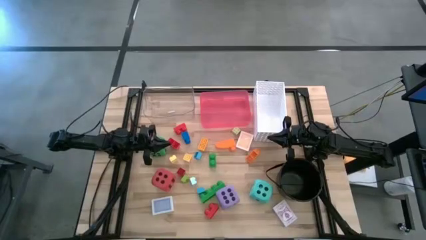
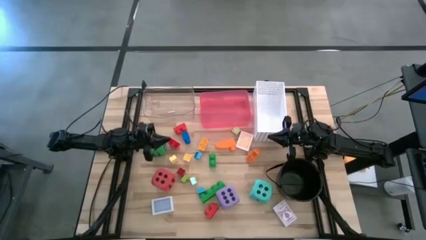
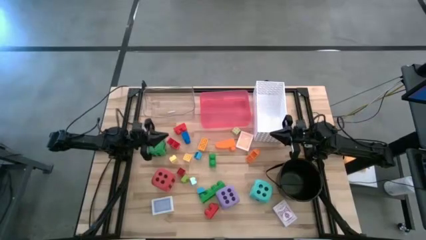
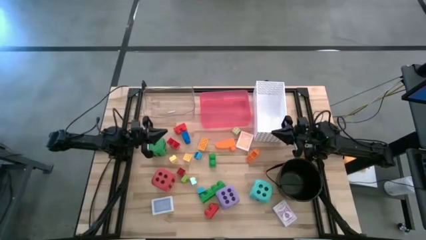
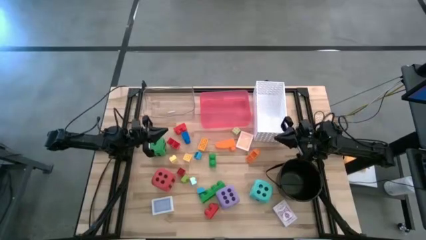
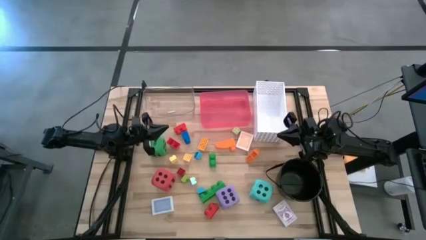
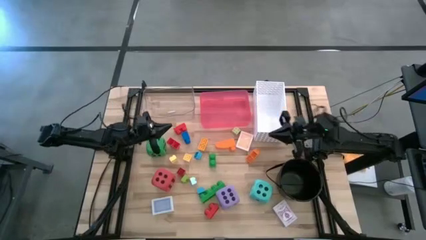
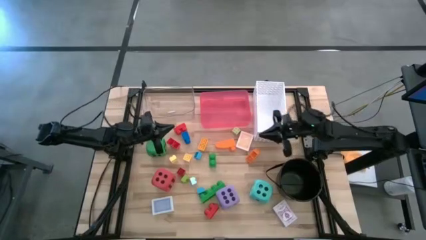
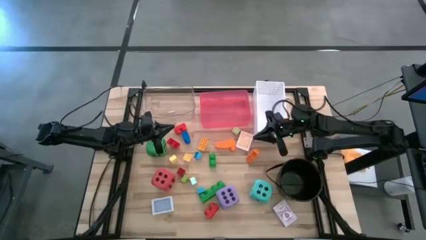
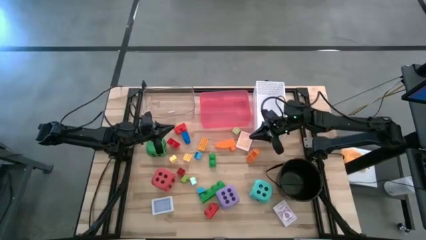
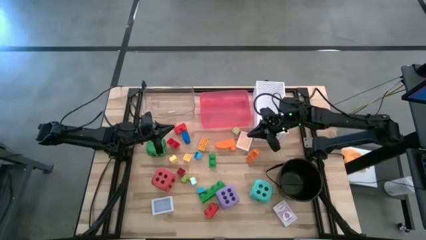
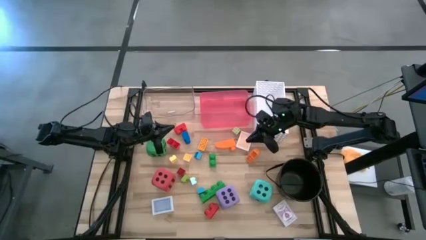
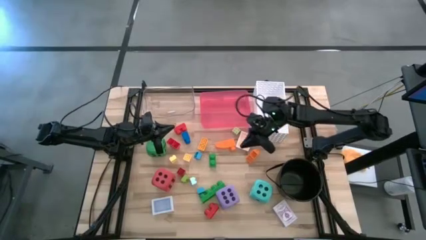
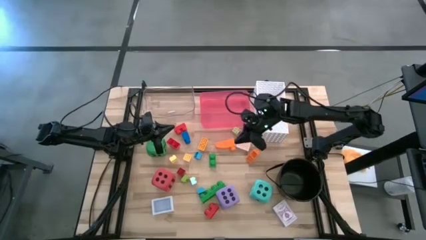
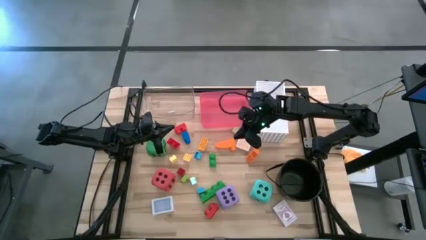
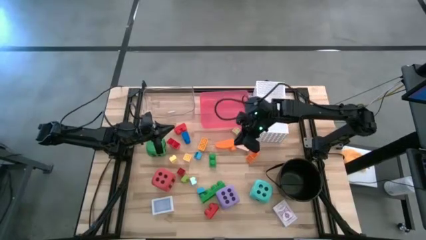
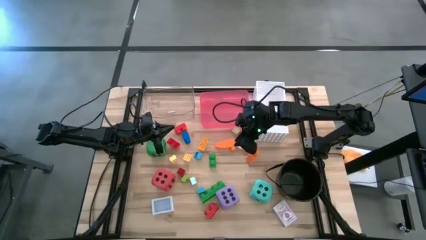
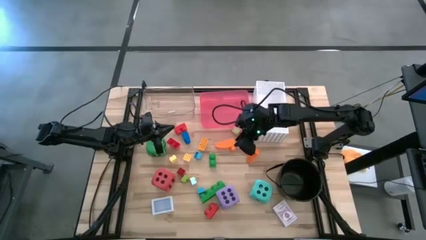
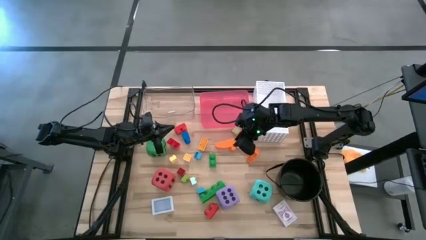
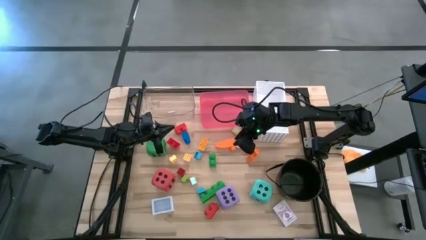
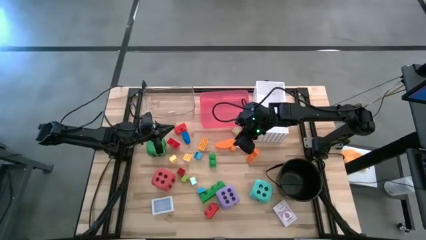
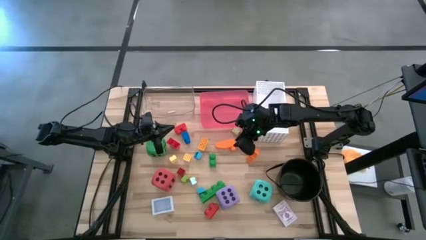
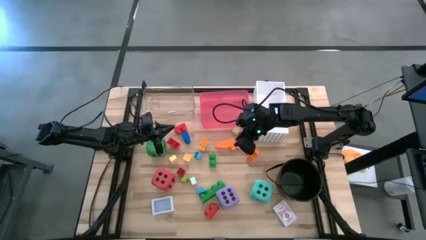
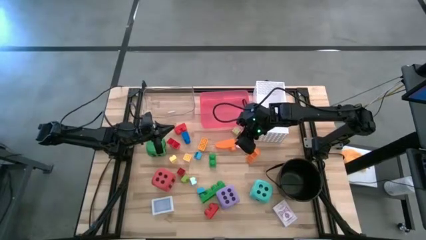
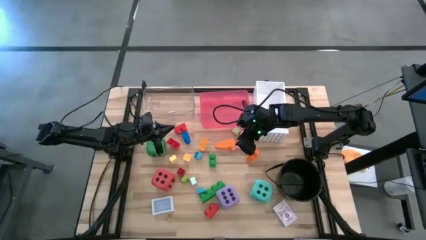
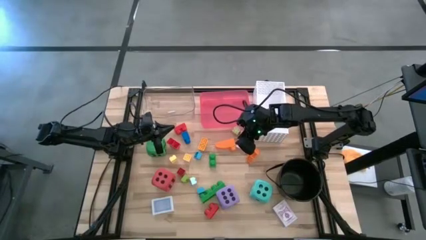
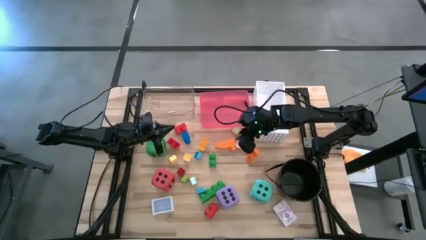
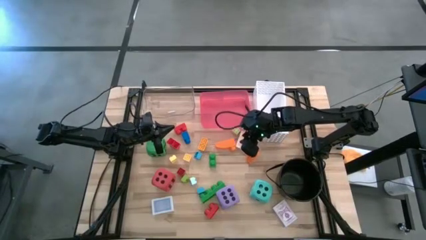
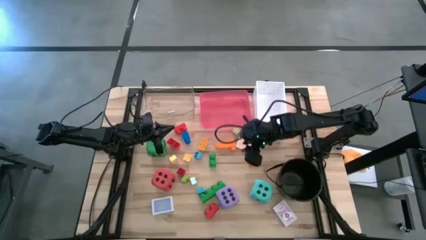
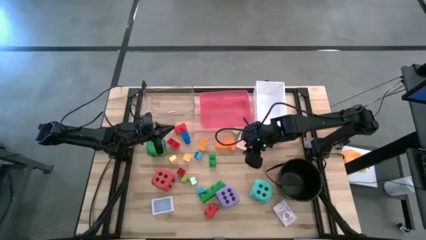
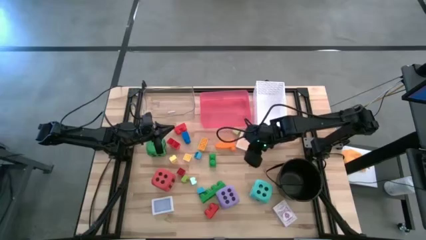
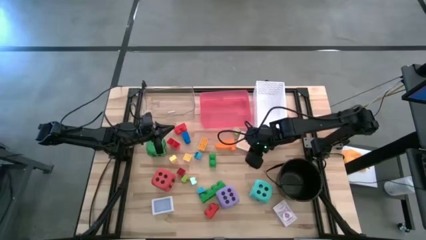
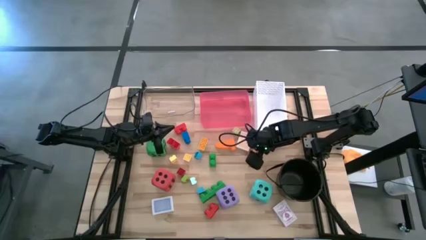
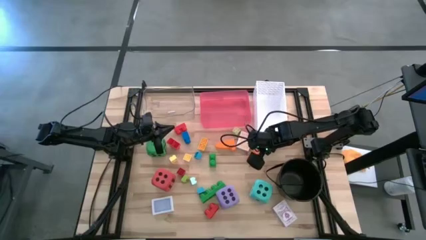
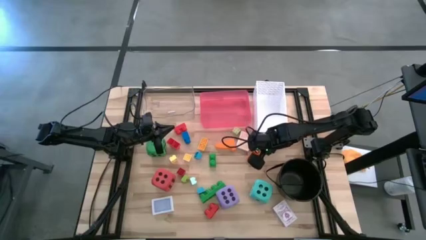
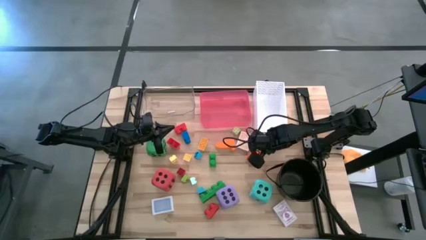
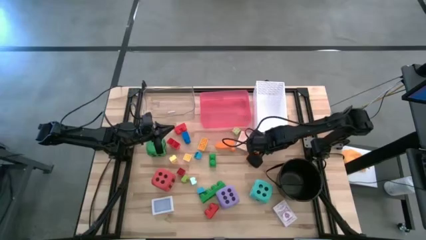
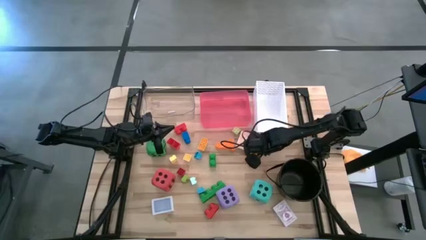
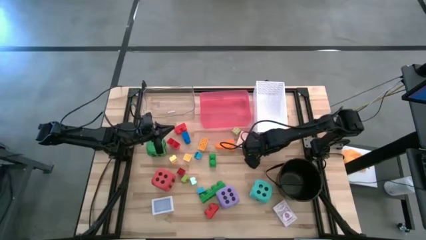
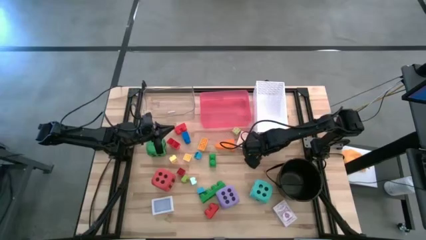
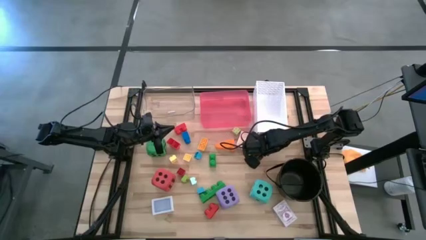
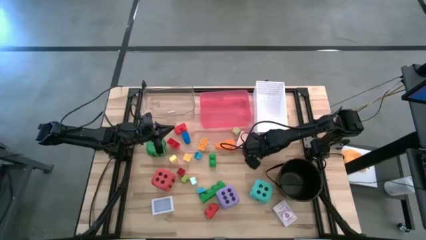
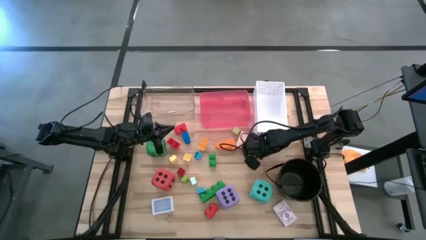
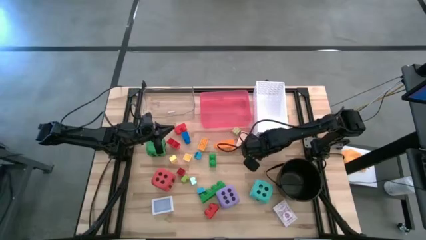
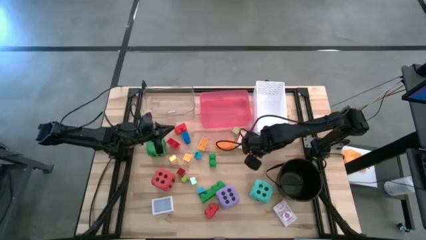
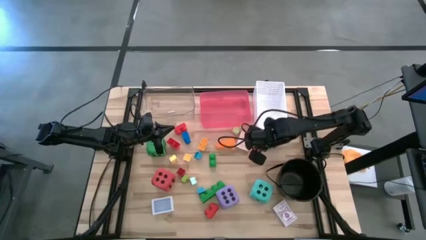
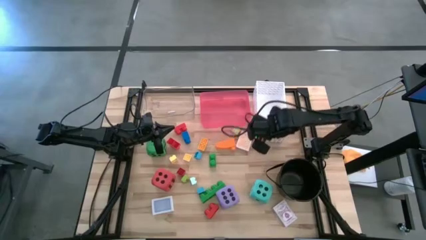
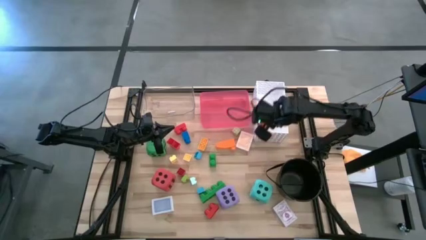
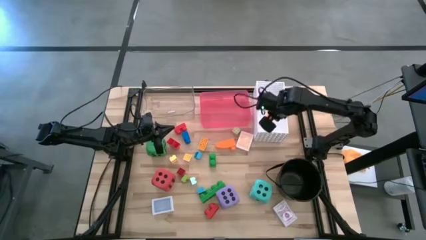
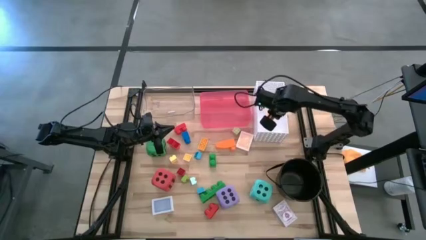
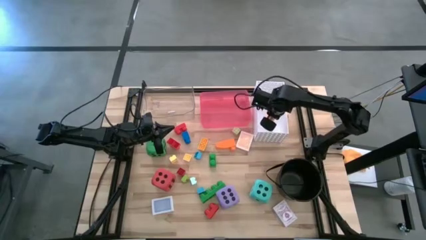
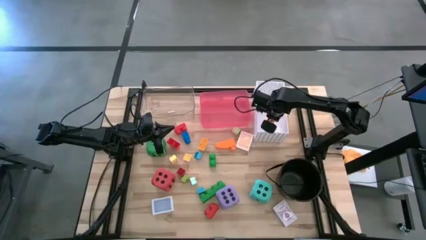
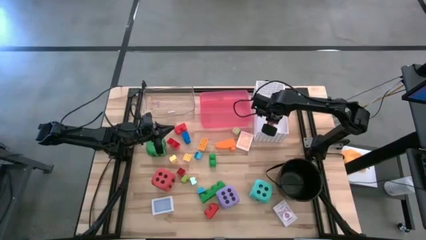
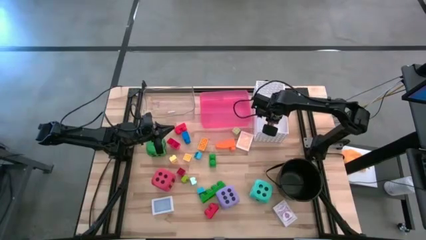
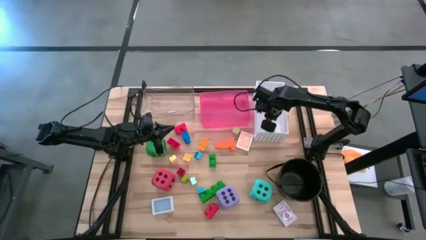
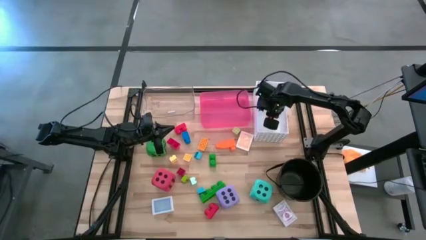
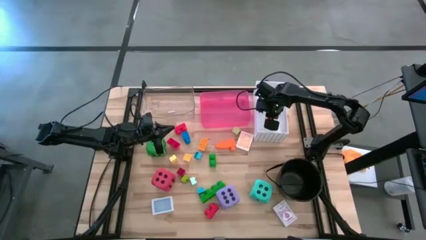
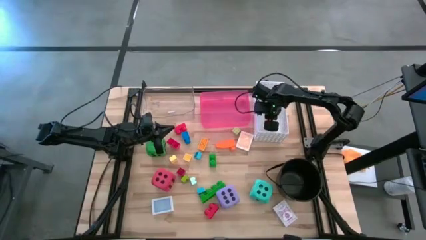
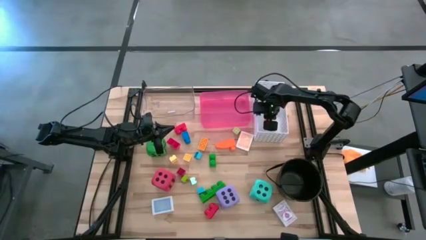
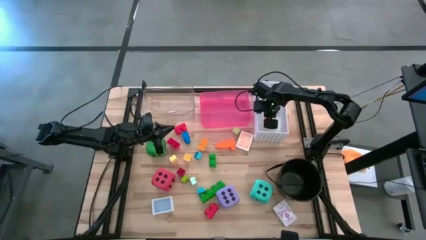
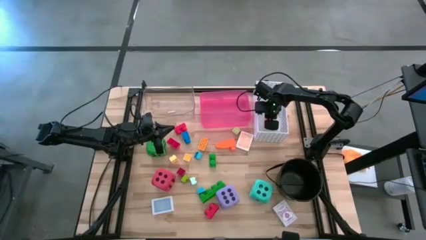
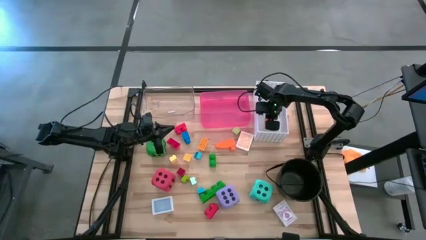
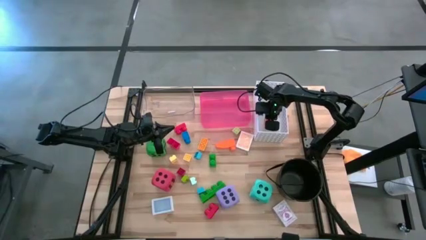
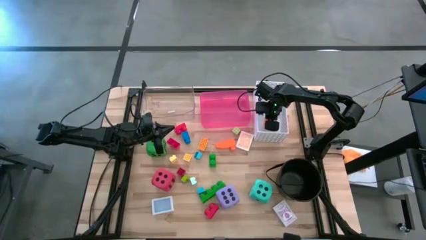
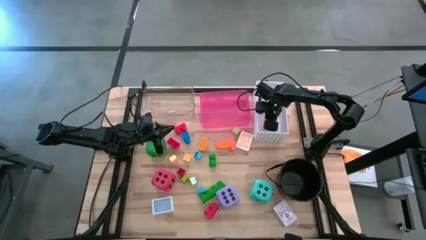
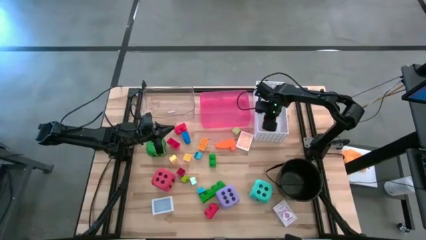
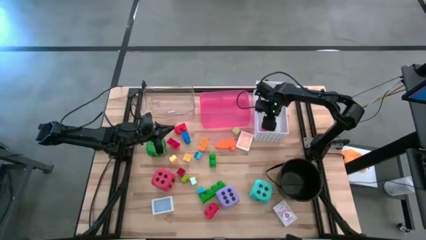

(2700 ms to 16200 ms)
Task: Pick & Place Toys
Put the right large orange game piece into the white bin

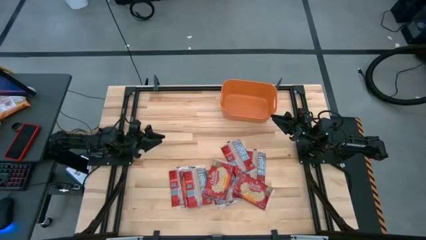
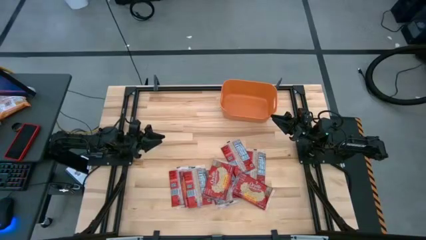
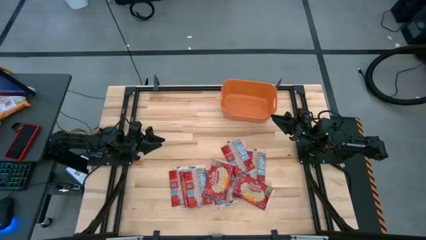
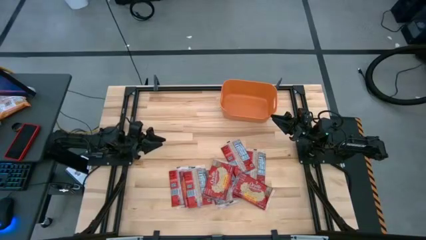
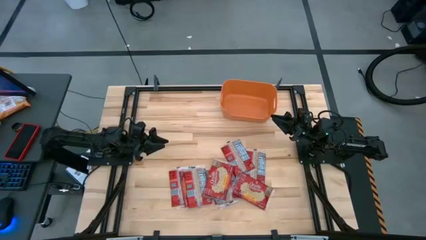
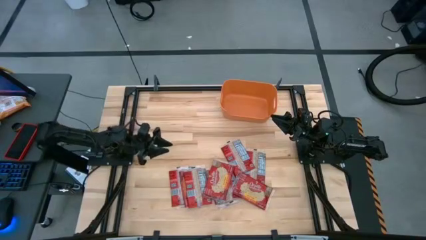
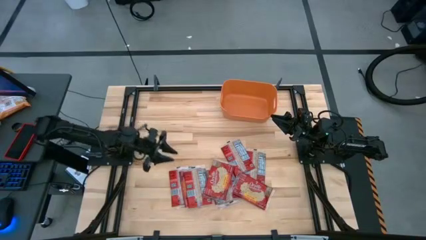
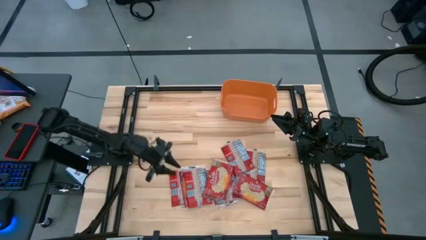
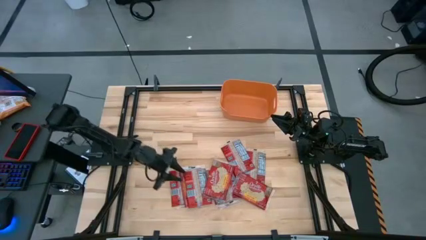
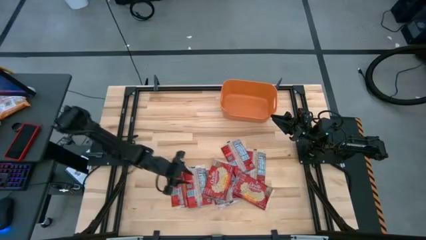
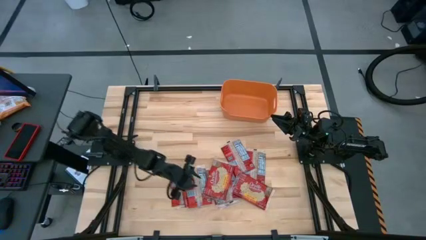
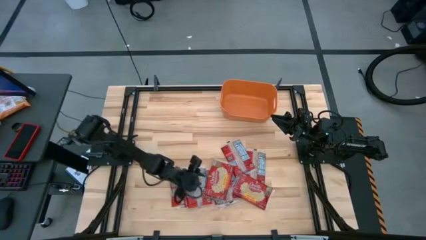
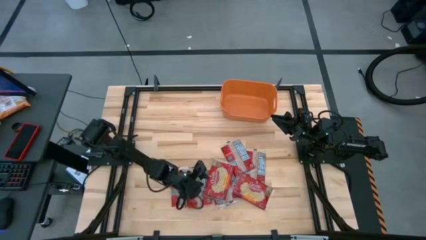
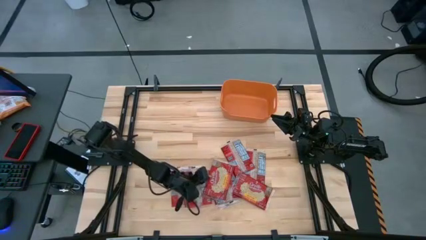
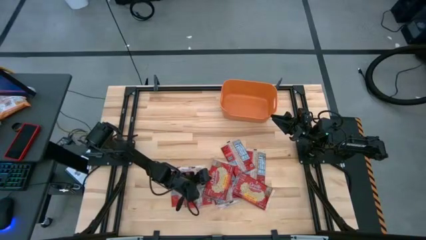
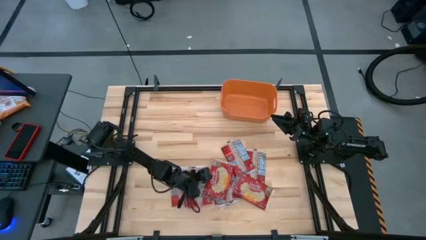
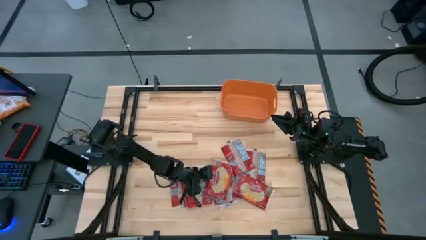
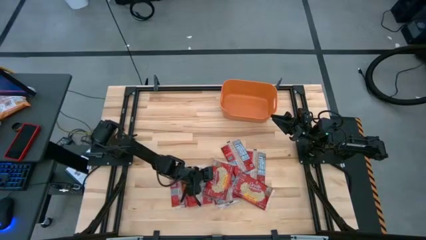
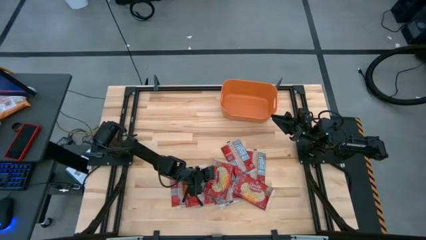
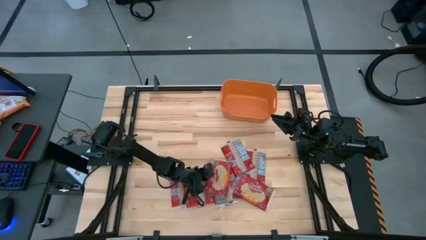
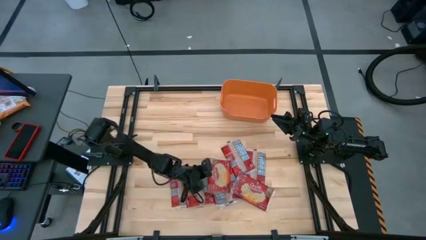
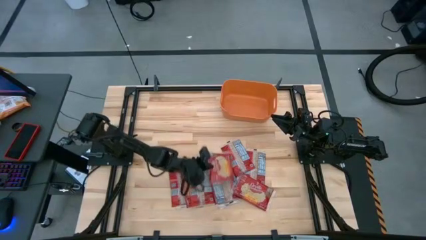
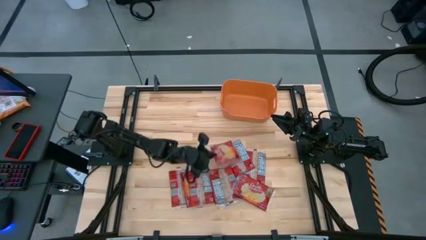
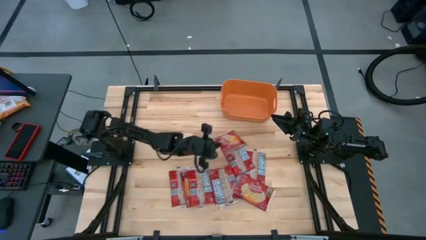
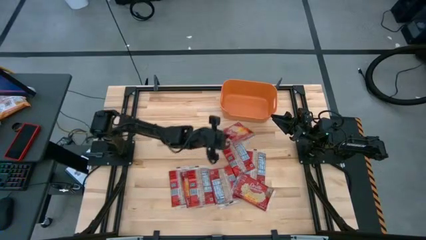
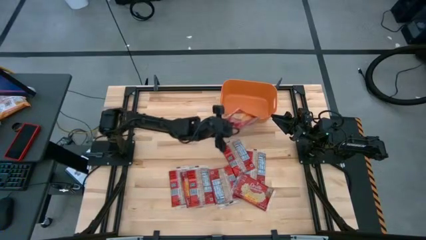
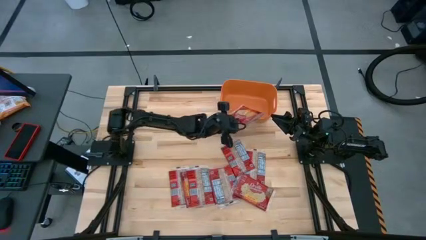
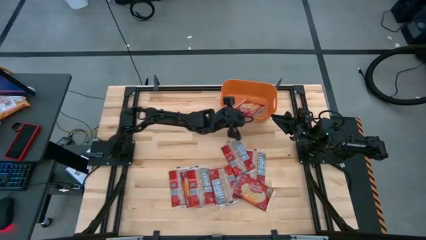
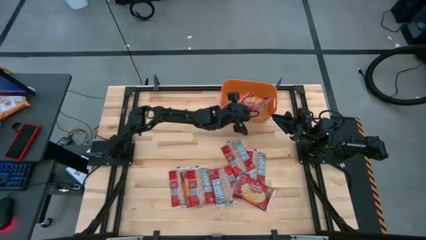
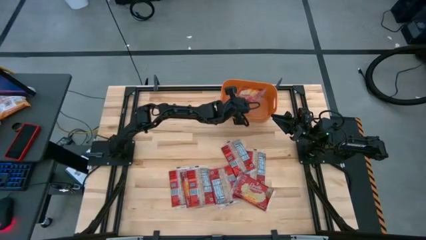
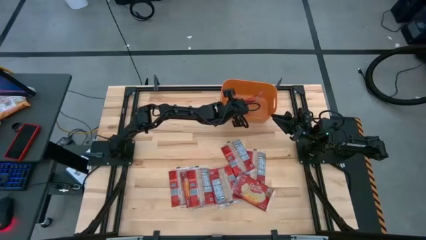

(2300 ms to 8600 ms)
Task: Sort popcorn bags into baskets
Put the red popcorn bag into the orange bin
